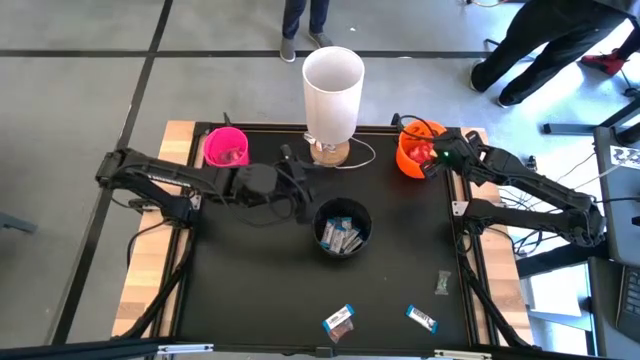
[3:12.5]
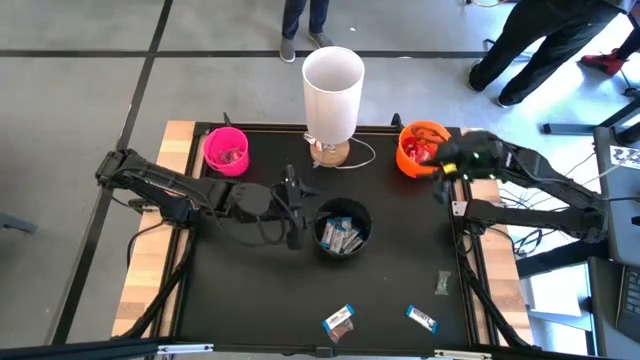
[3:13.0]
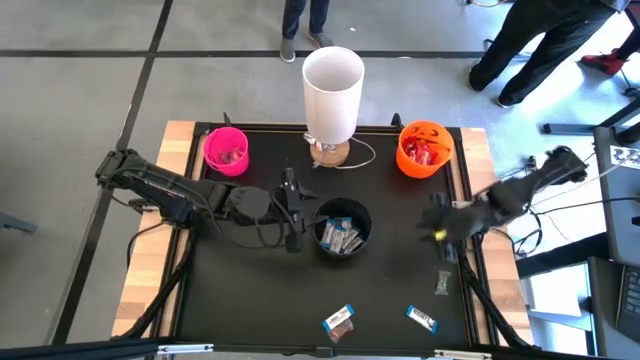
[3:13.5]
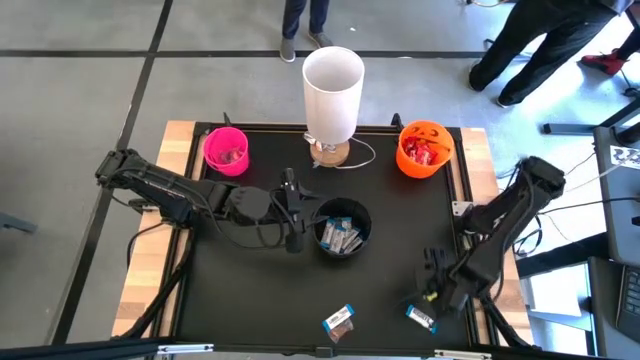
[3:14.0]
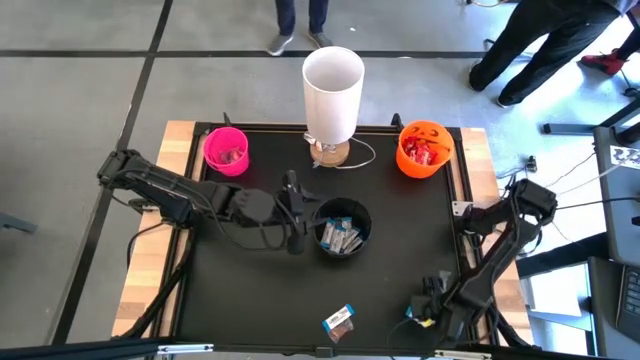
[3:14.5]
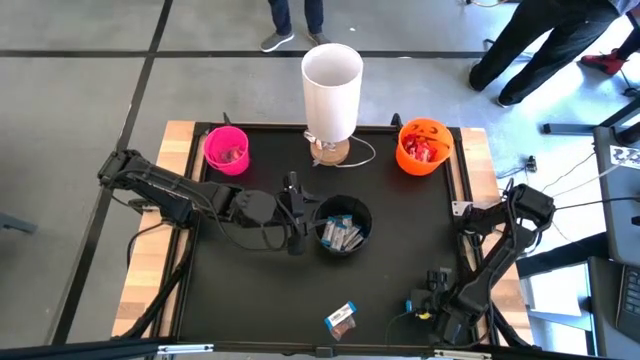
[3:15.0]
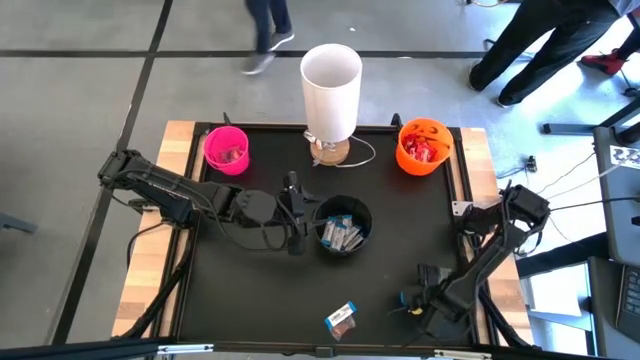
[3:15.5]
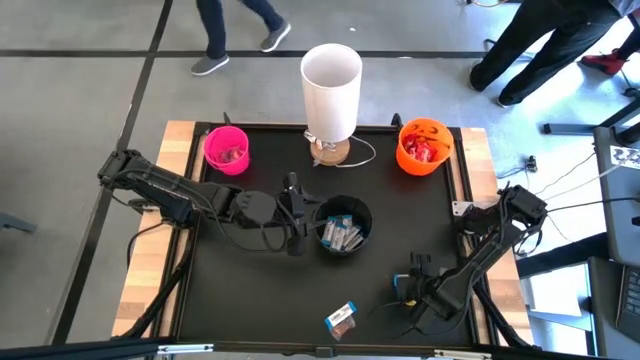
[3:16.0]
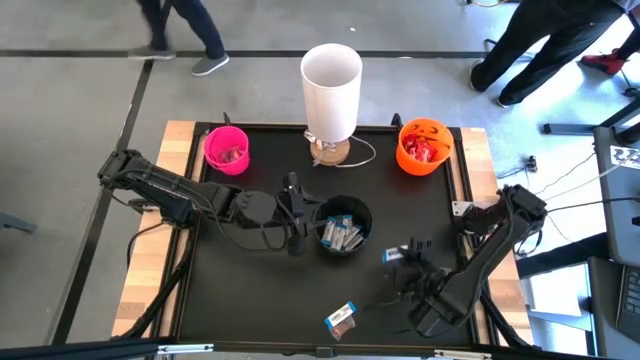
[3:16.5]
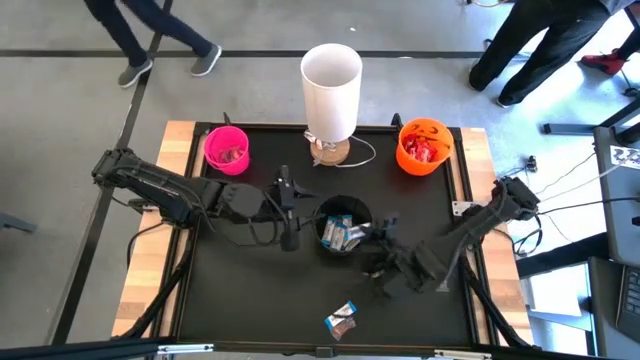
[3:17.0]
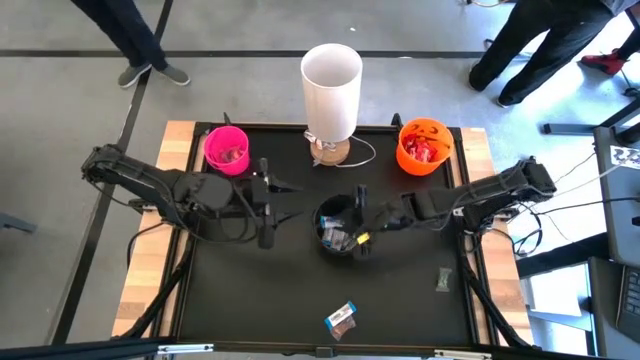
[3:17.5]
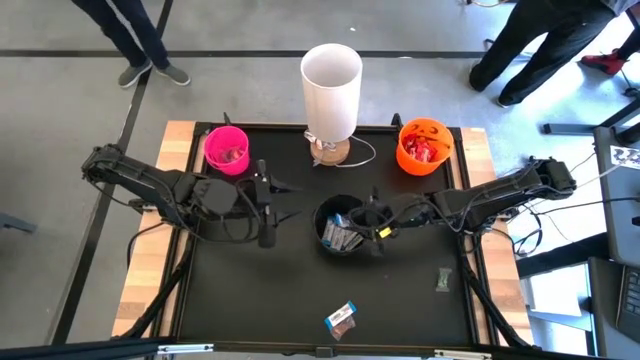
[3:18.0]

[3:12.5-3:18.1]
Task: Sort candy
Put the white chocolate into the black bucket

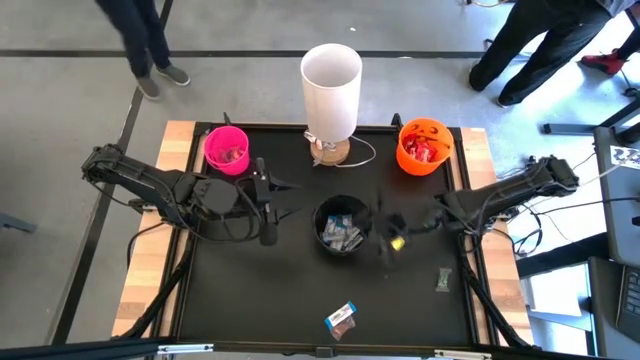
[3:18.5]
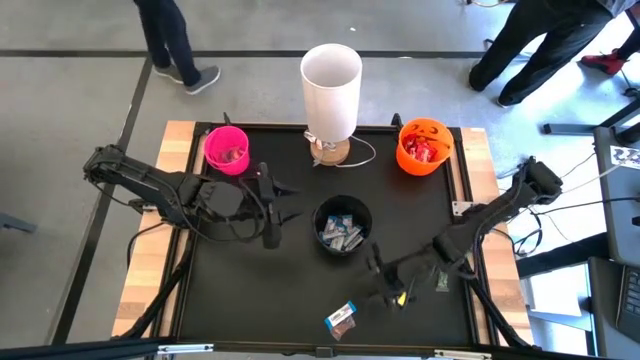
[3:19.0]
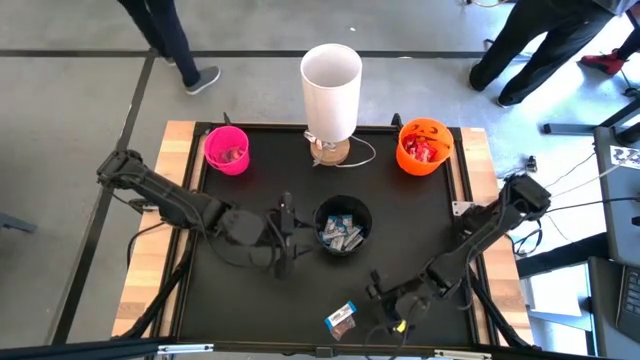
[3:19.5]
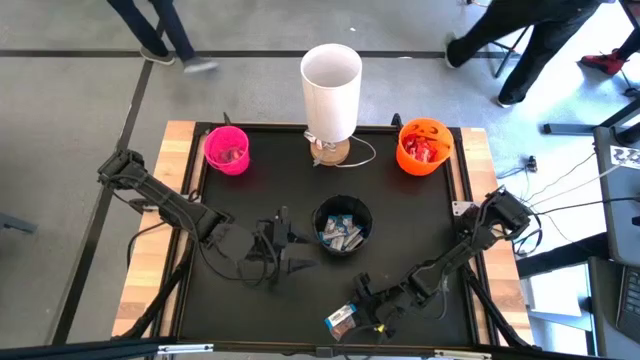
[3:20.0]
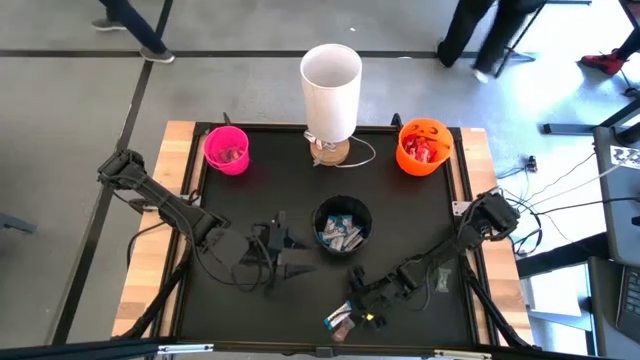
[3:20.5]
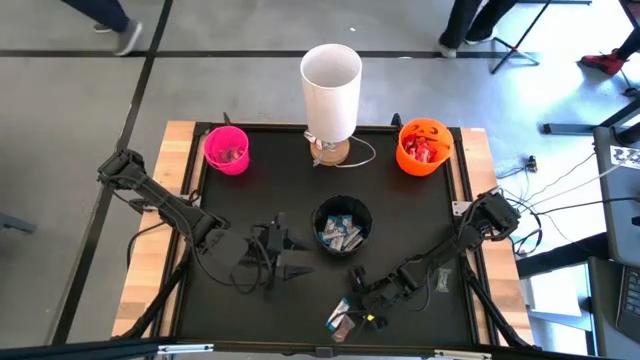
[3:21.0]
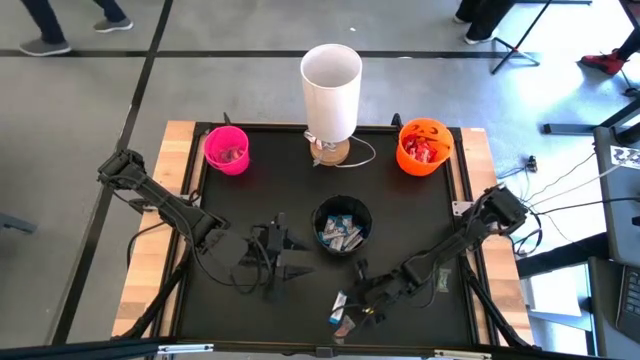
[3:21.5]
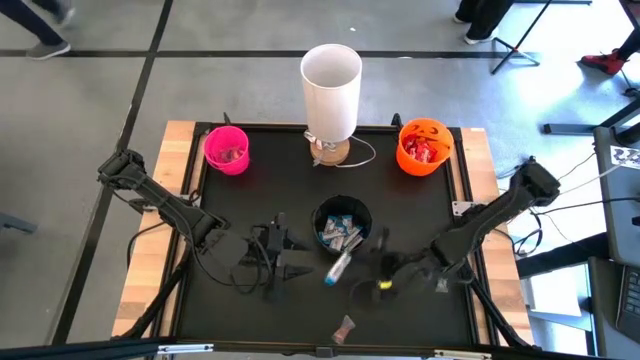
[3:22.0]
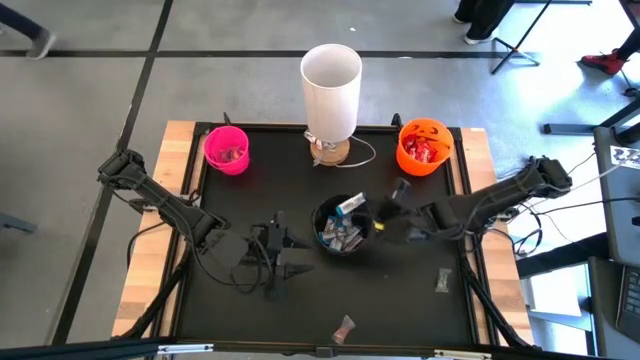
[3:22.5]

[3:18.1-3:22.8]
Put the white chocolate into the black bucket

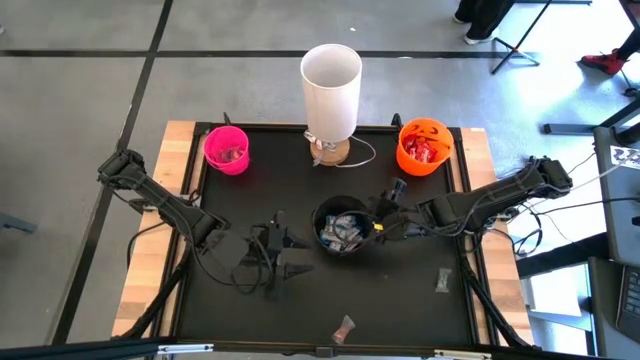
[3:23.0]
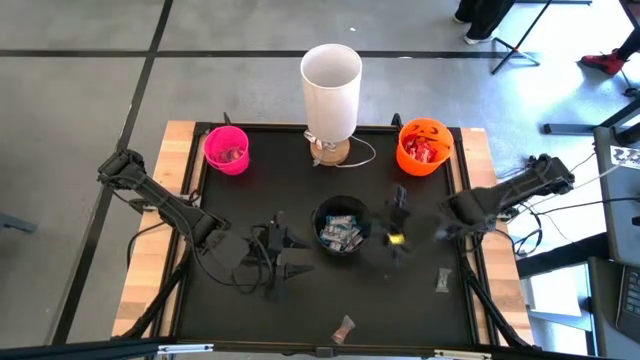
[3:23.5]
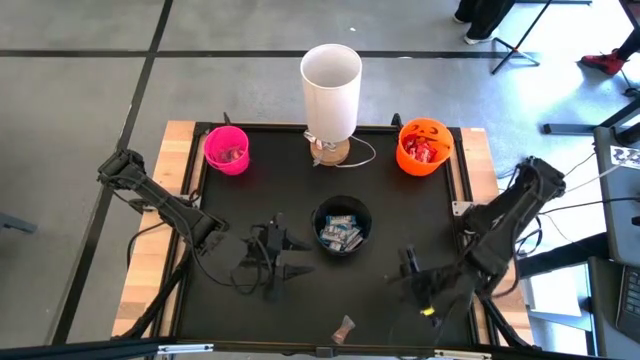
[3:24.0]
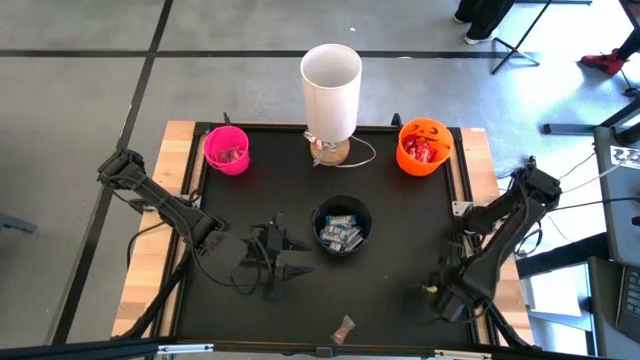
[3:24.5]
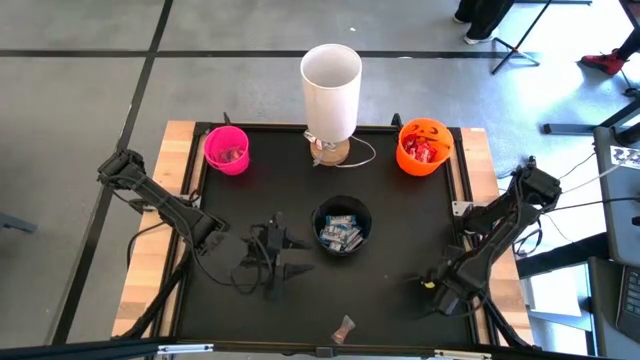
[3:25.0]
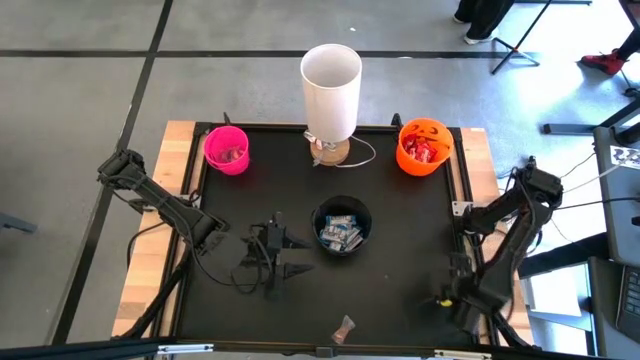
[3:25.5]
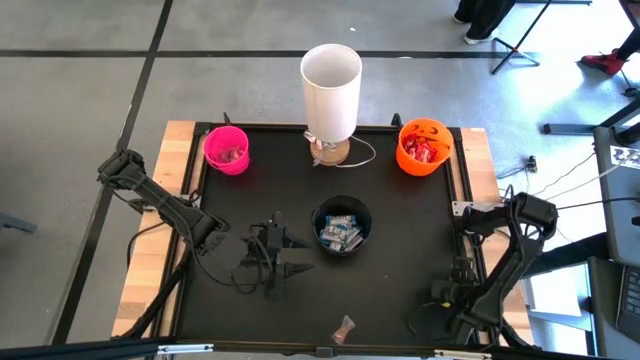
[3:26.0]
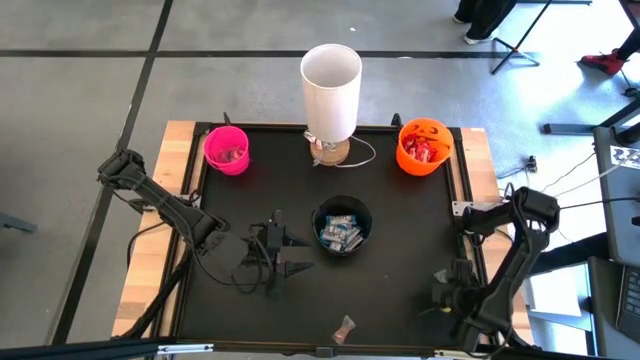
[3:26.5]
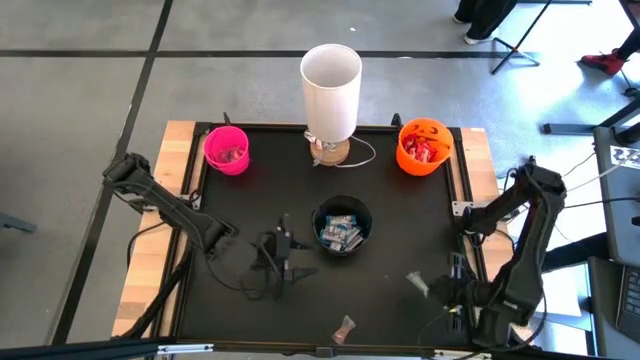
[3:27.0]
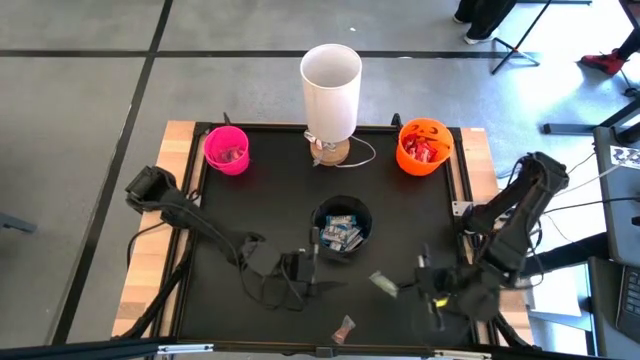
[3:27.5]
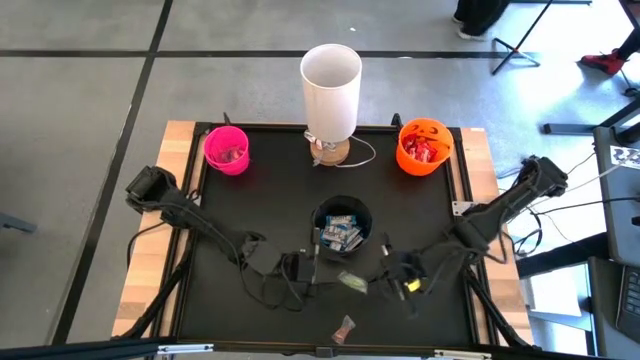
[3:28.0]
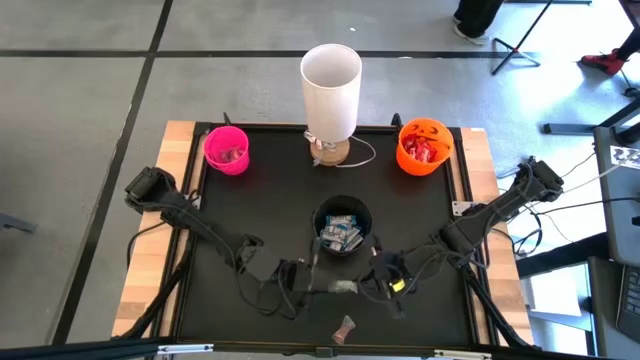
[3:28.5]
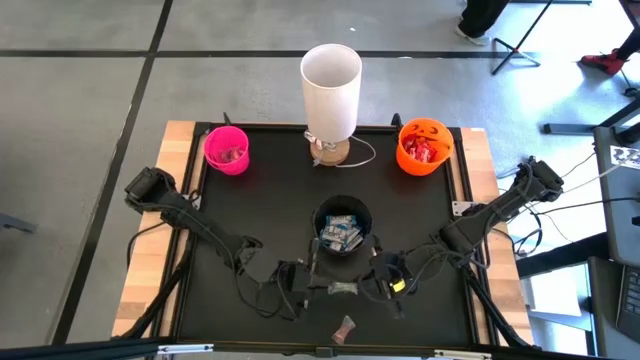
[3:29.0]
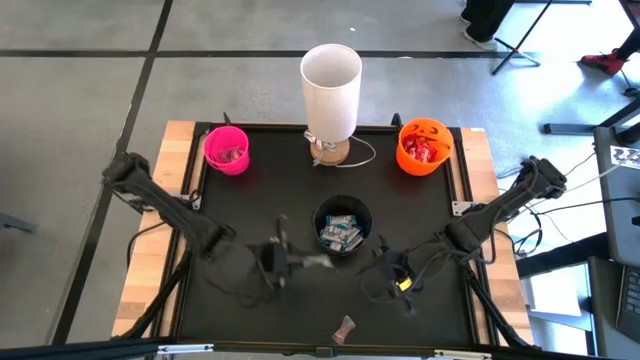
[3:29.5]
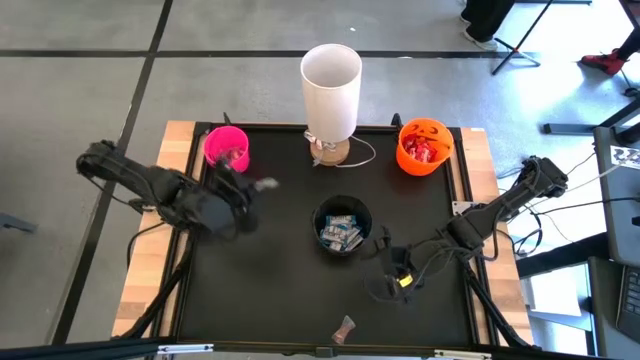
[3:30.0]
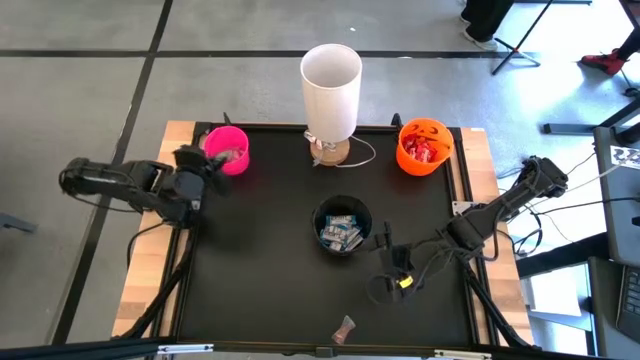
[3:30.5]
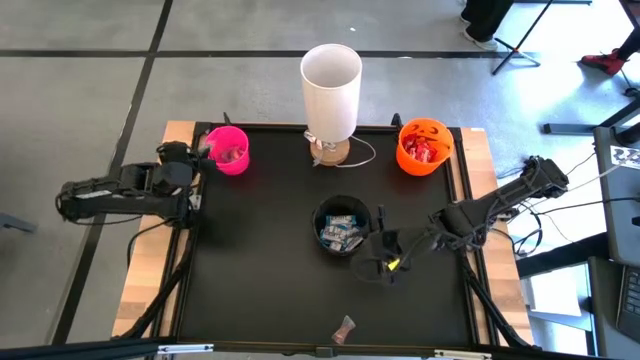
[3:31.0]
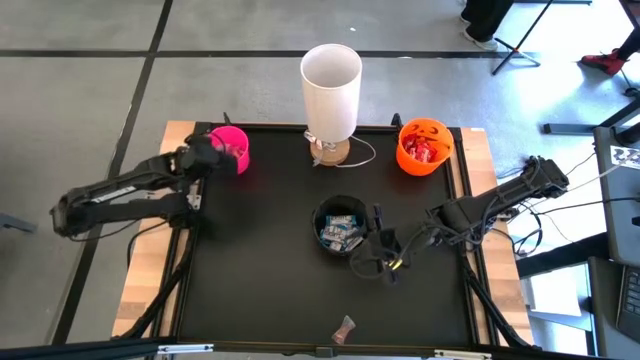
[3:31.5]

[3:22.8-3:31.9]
Put the green gummy into the pink bucket

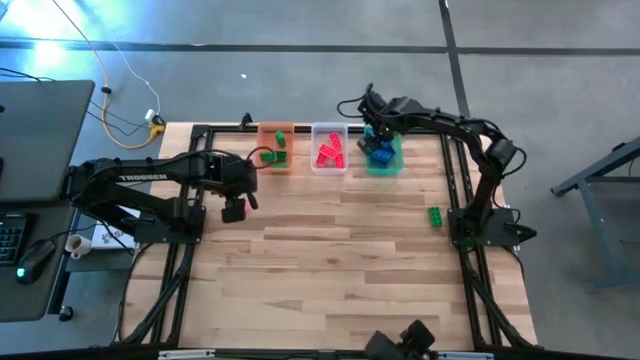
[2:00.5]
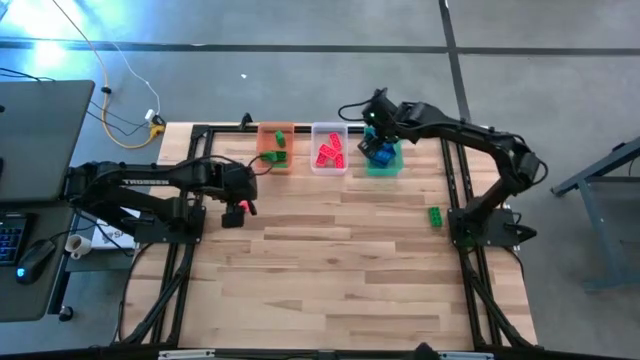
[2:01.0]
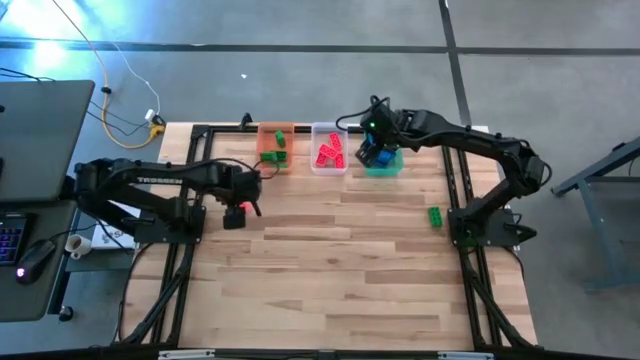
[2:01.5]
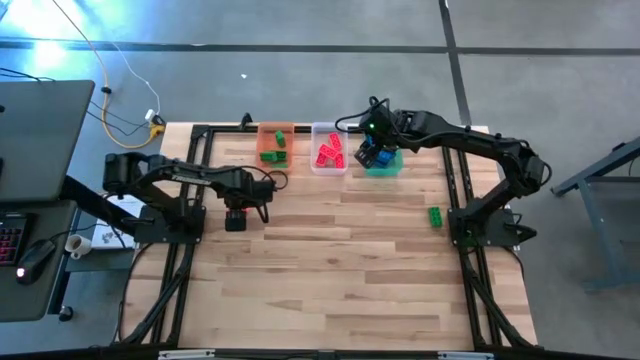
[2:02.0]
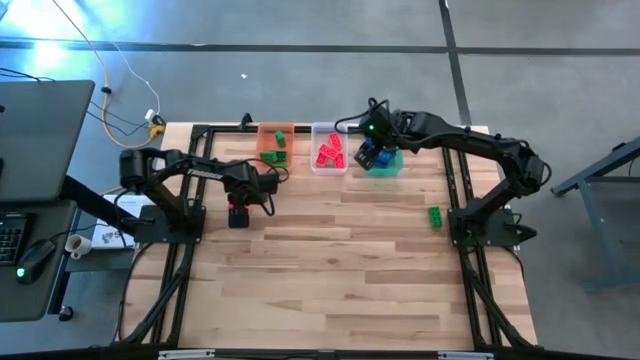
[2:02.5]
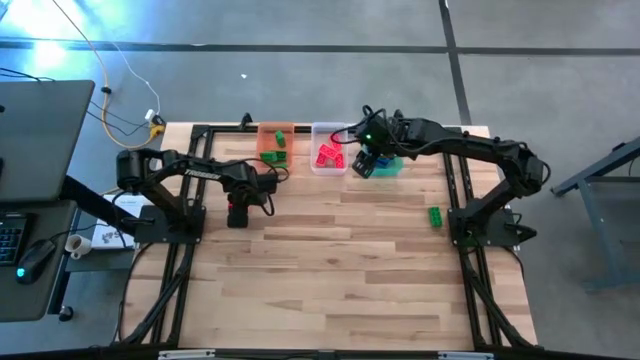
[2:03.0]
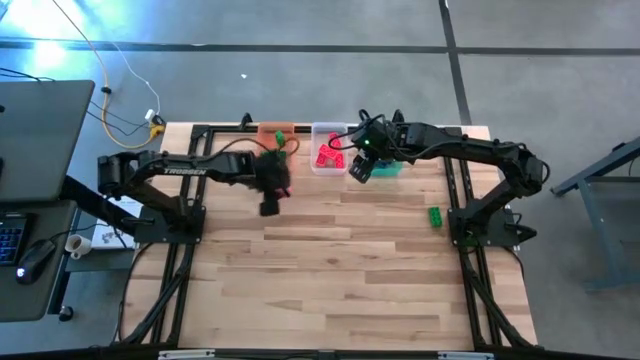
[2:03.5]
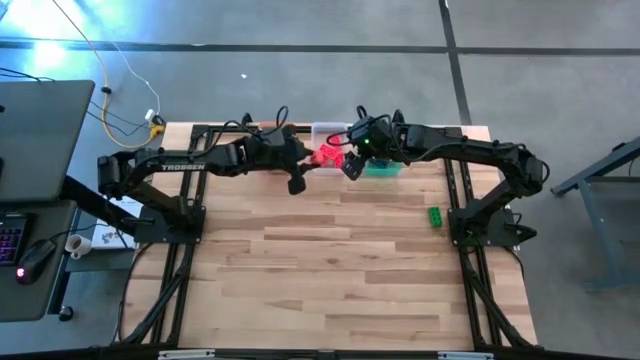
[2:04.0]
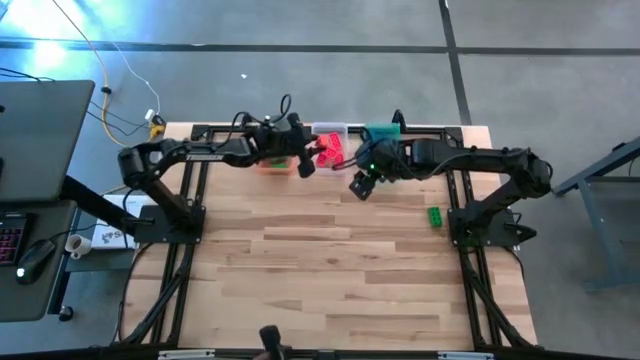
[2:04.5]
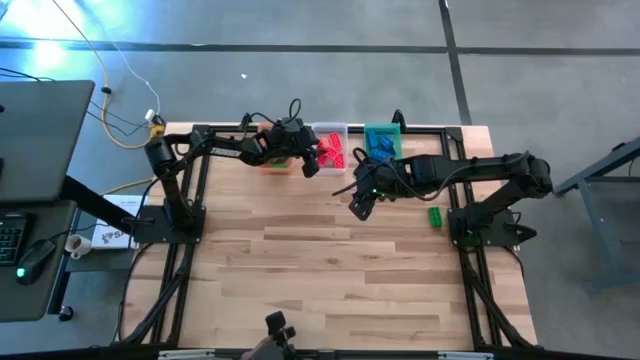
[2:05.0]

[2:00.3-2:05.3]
Task: Sort & place blocks by color
Put the orange game piece into the transparent bin
